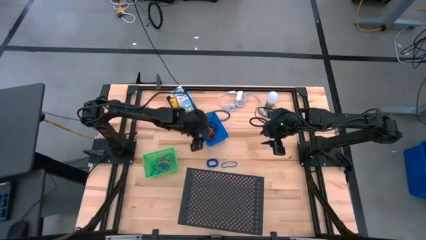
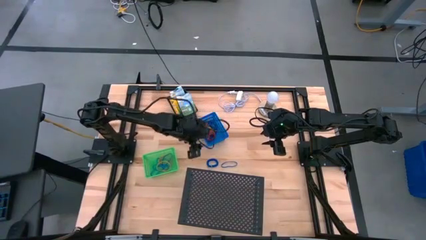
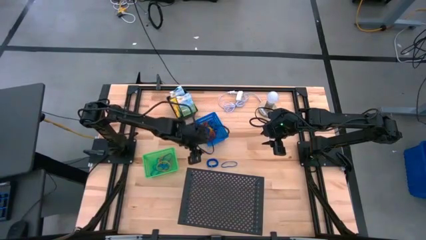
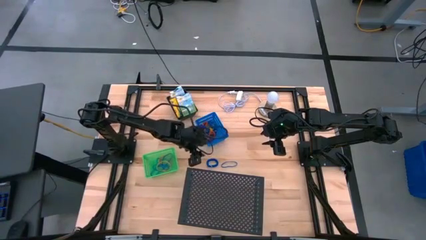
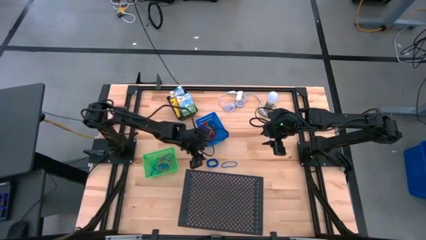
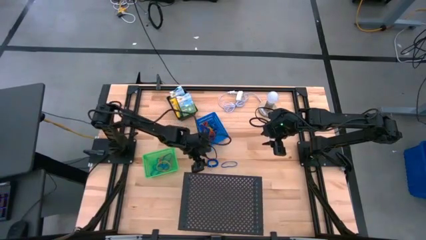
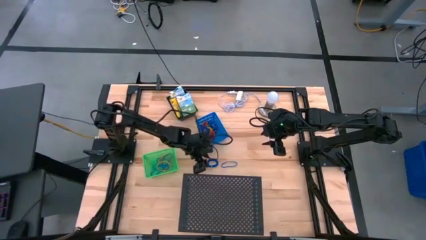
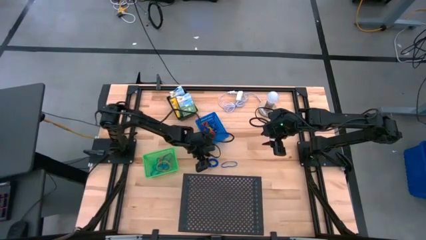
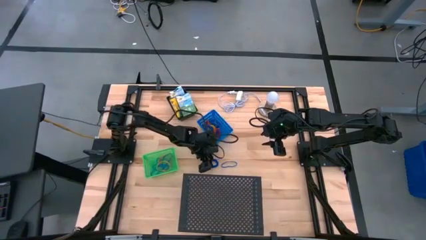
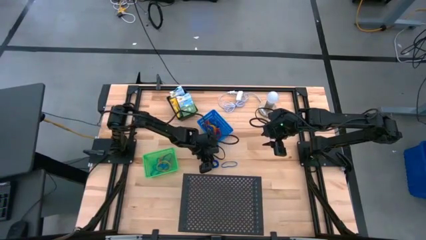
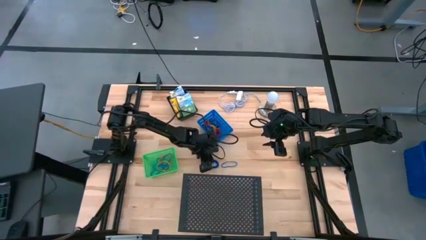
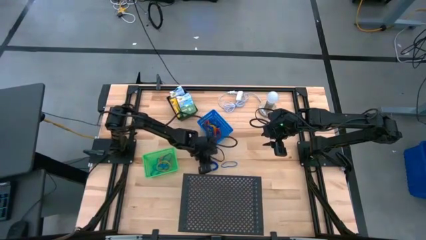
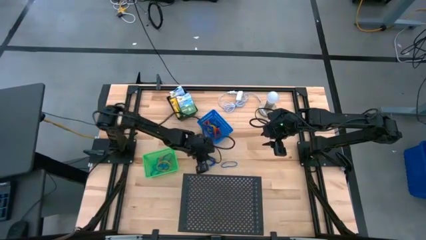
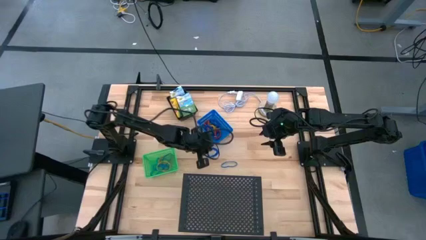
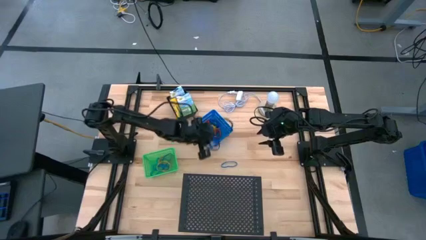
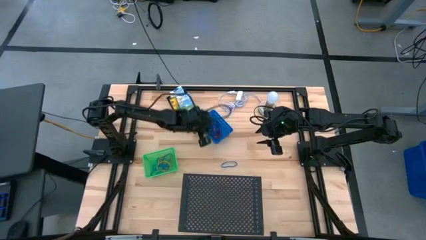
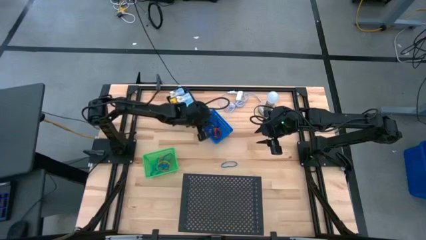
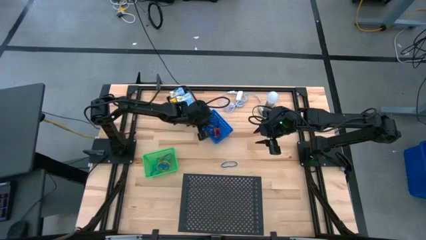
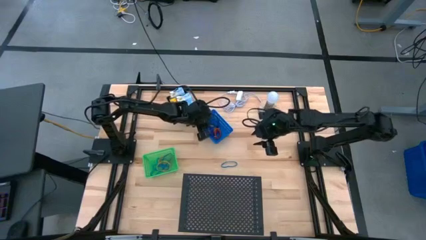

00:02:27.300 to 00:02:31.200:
Task: Pick & Place Office Desk Supplies
Put the blue key band into the blue bin

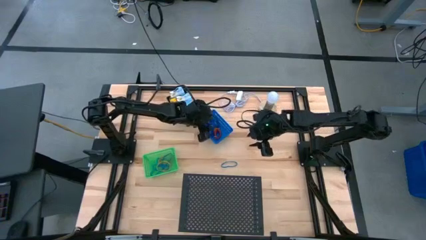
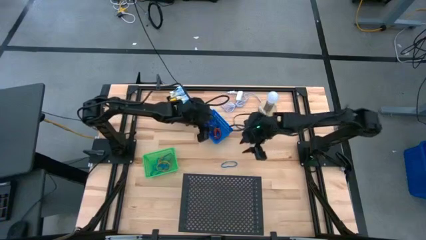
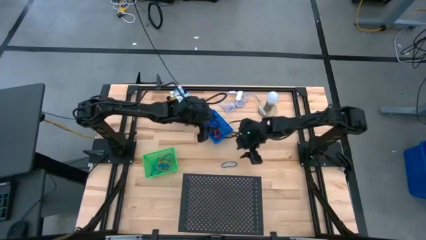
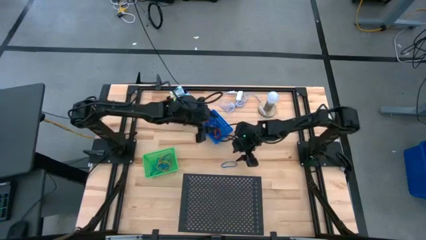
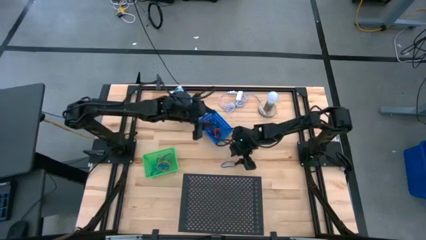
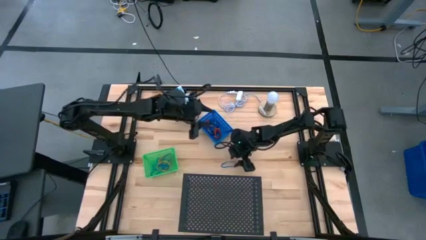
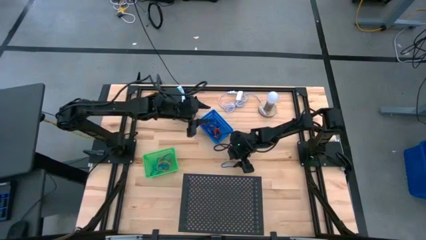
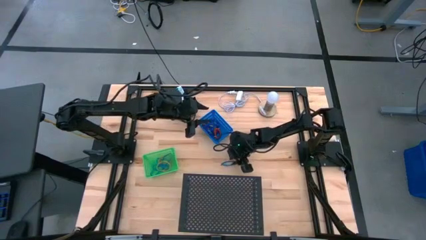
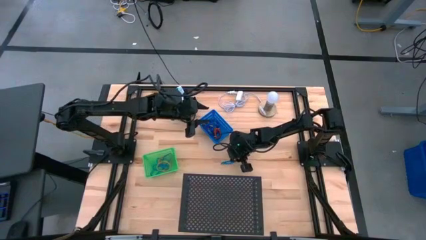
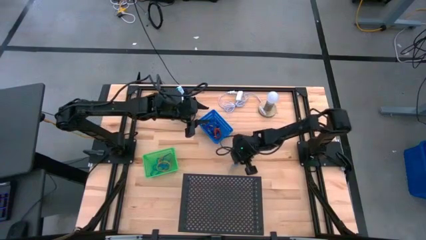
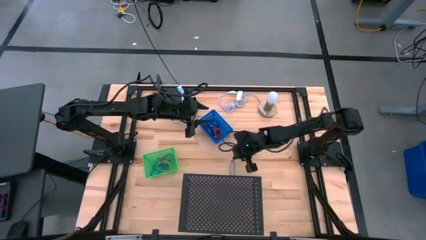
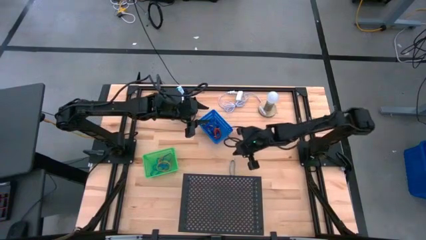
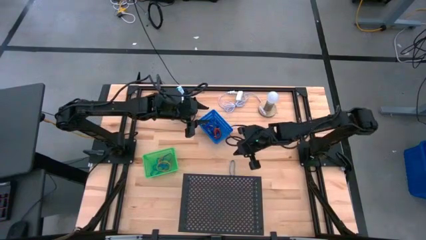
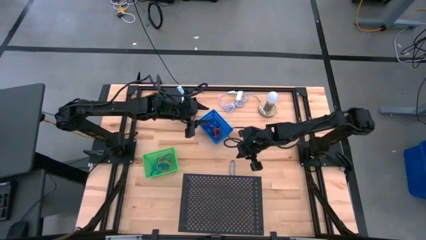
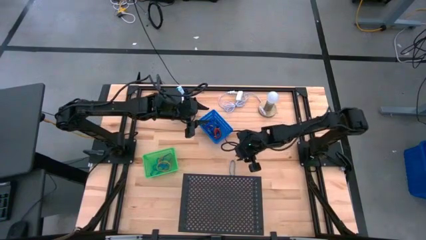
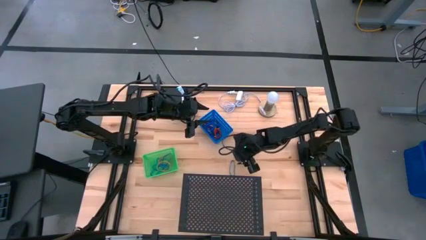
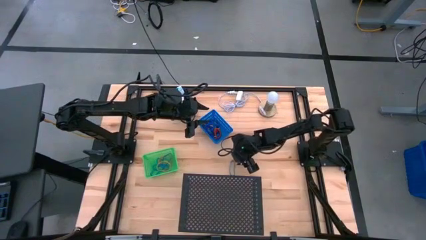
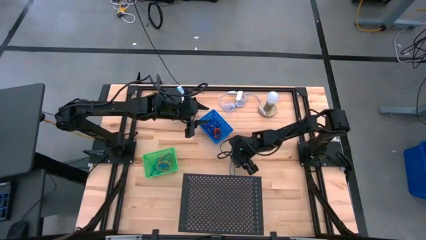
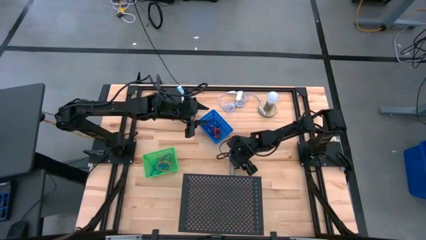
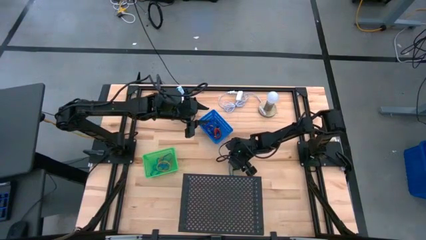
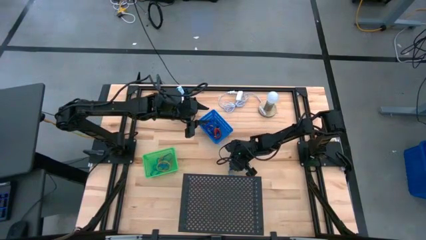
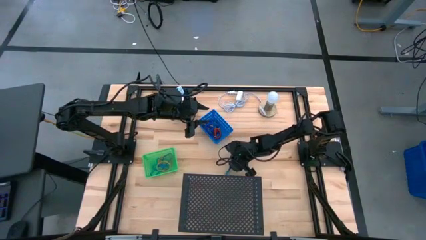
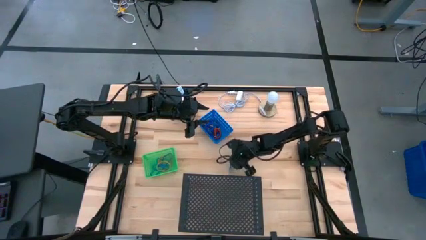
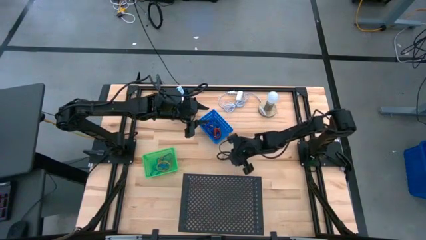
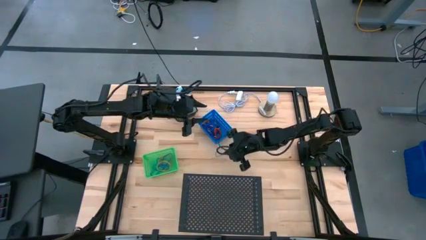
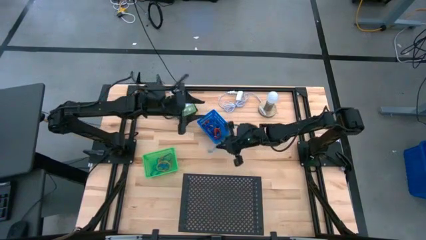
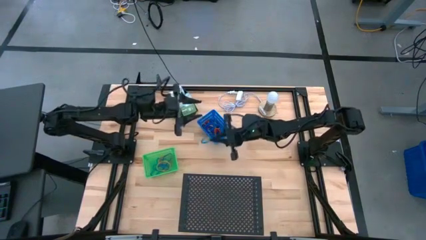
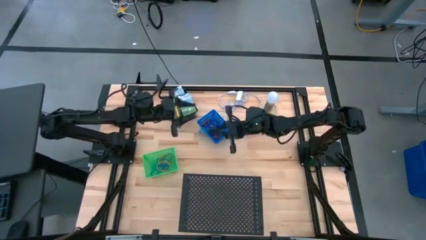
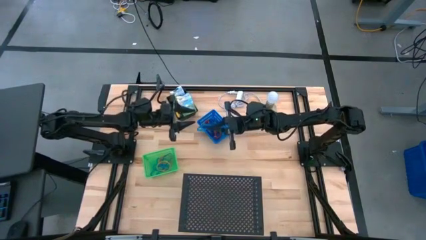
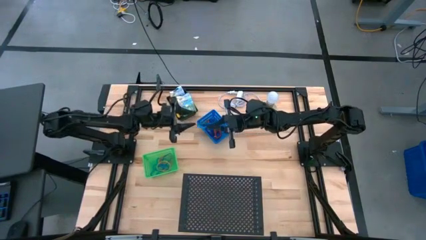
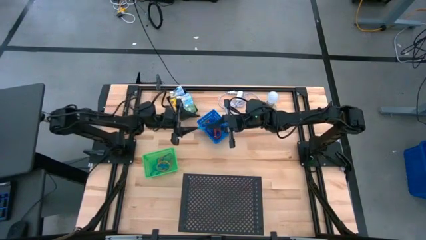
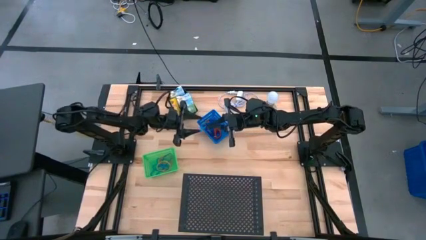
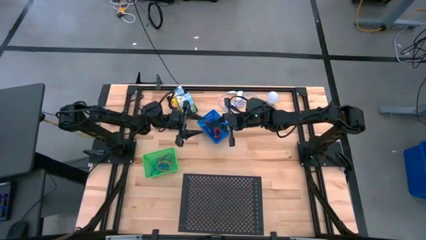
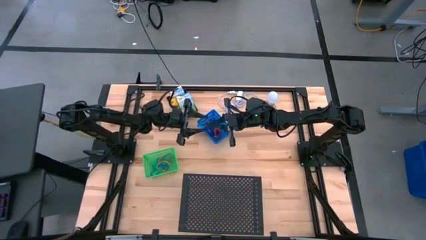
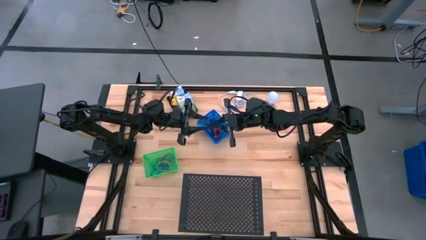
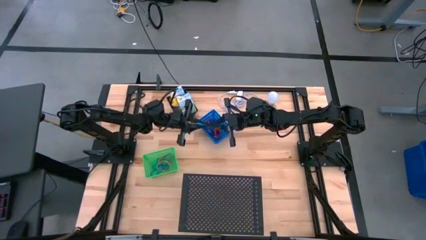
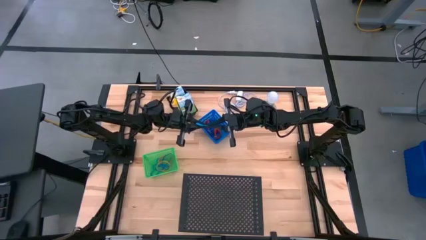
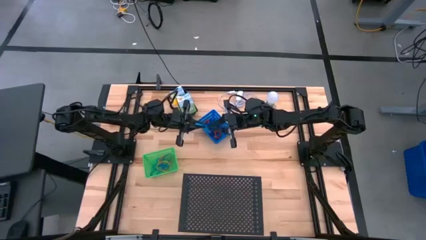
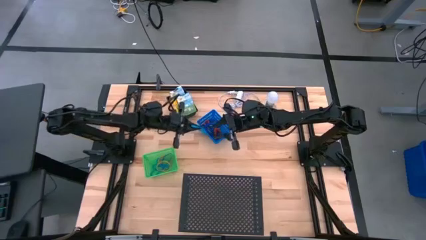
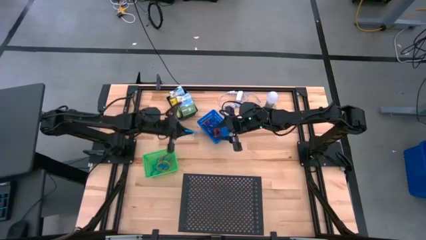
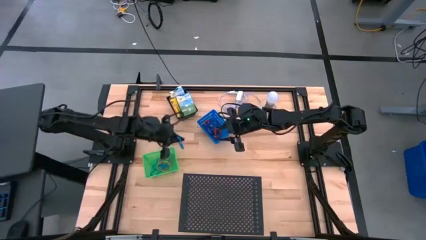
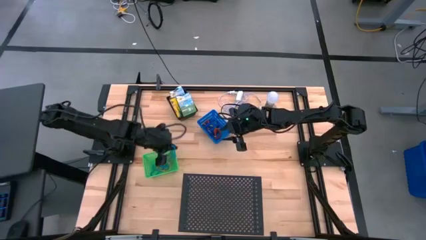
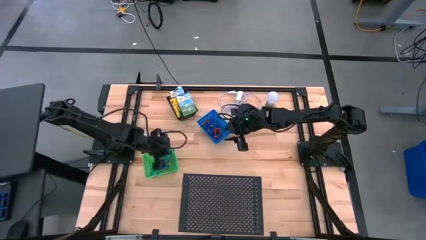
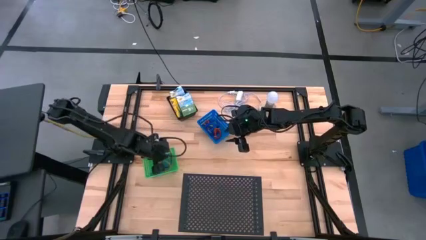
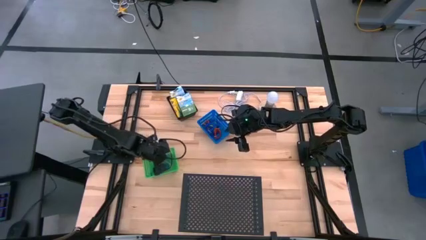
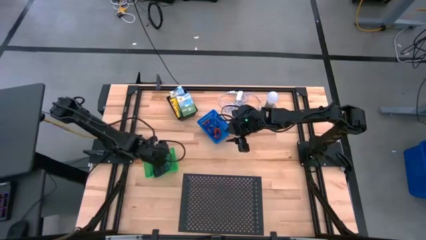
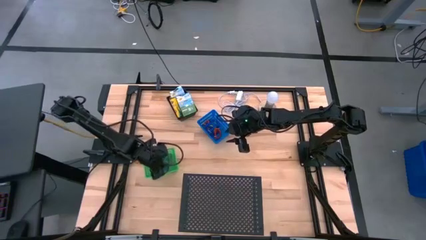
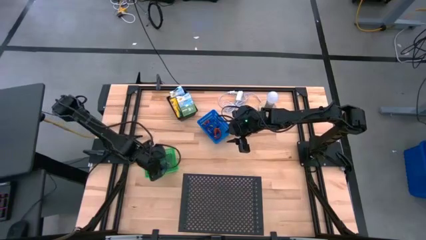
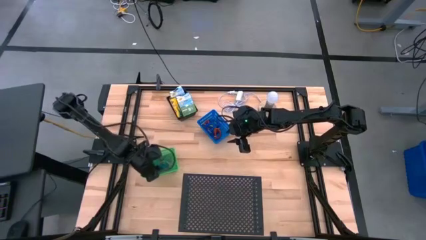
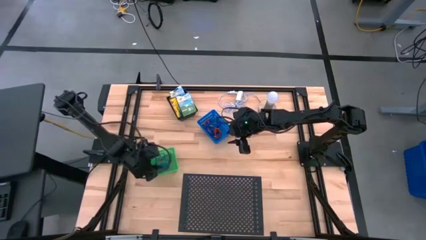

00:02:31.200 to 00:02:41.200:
Put the blue rubber band into the green bin
